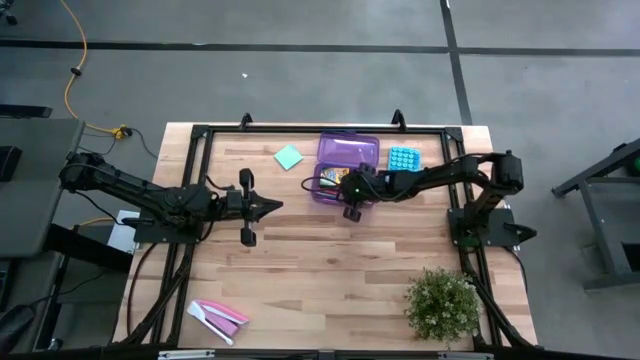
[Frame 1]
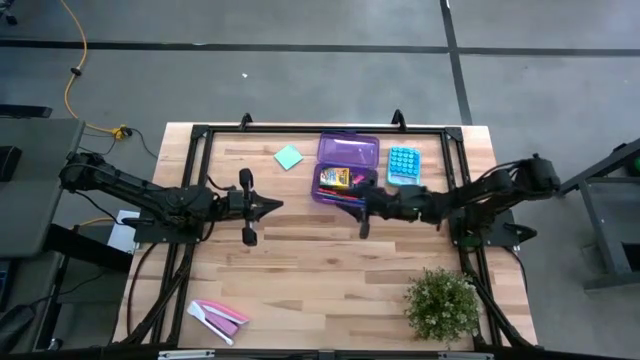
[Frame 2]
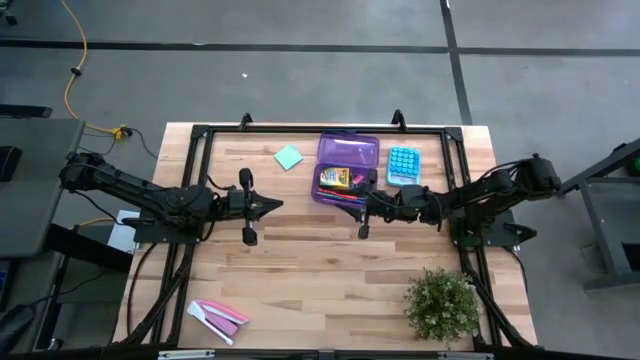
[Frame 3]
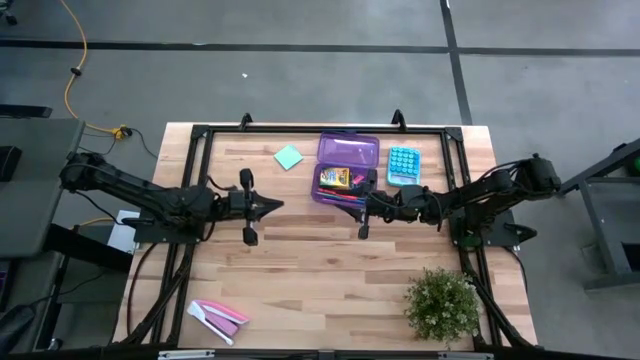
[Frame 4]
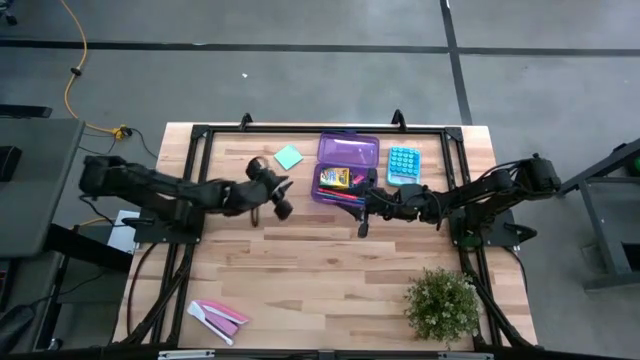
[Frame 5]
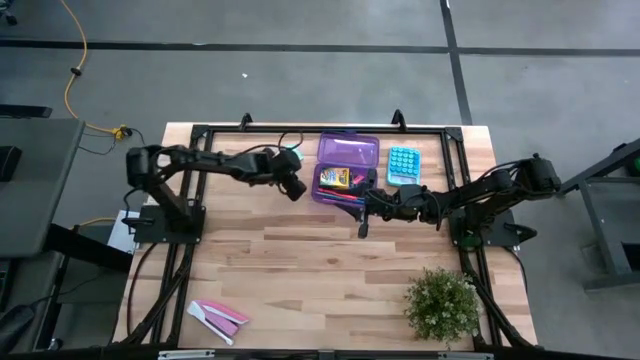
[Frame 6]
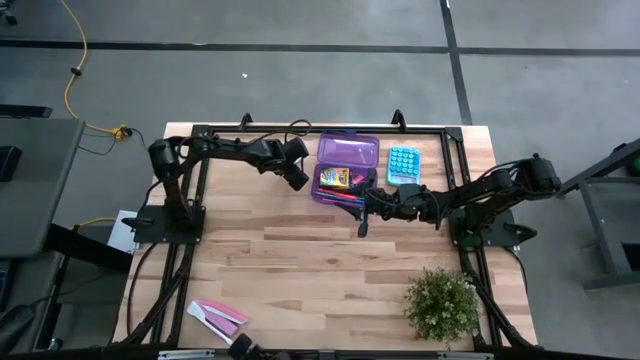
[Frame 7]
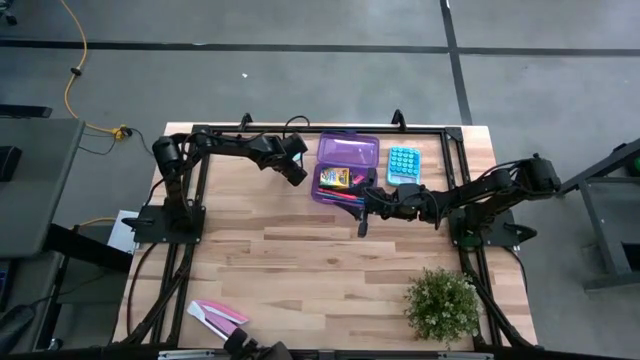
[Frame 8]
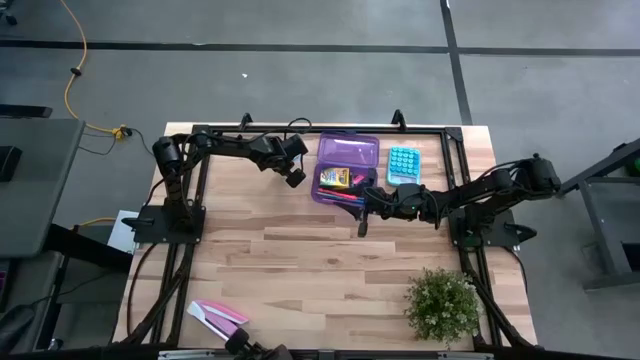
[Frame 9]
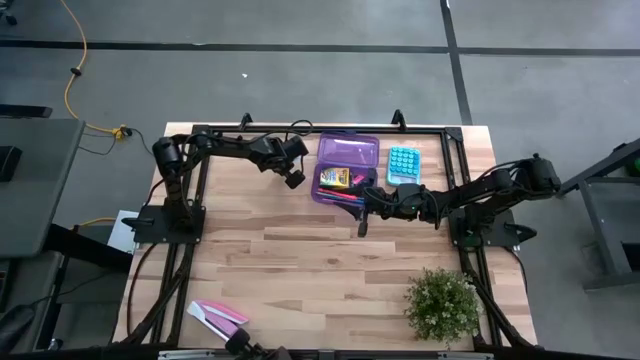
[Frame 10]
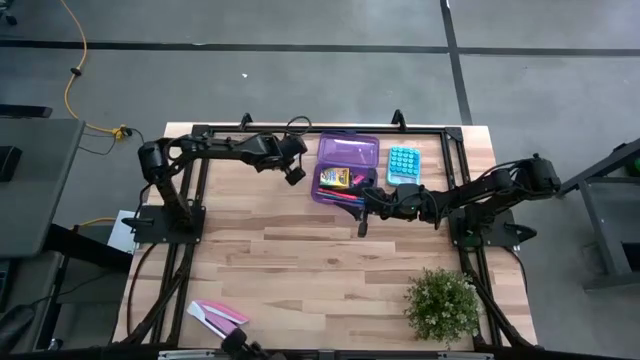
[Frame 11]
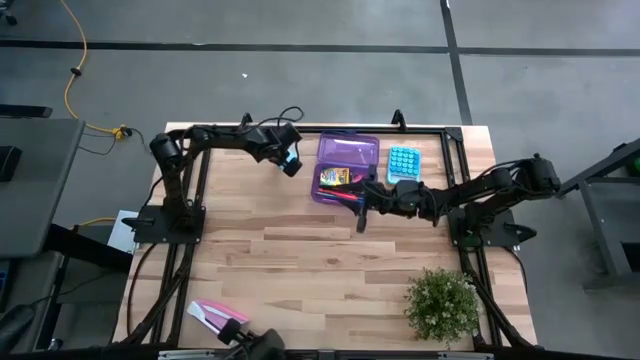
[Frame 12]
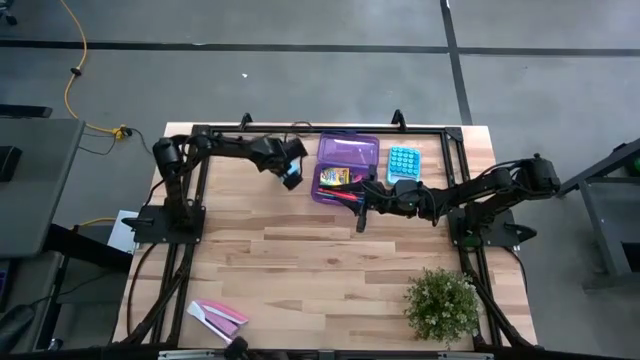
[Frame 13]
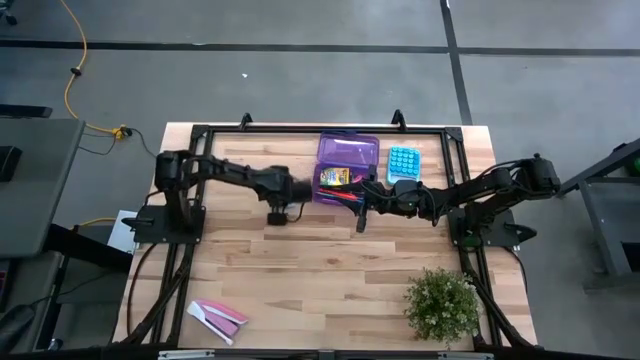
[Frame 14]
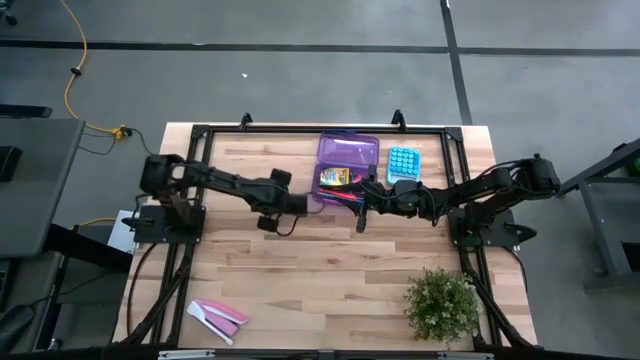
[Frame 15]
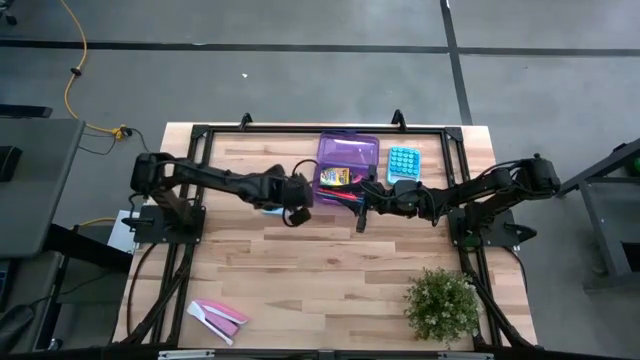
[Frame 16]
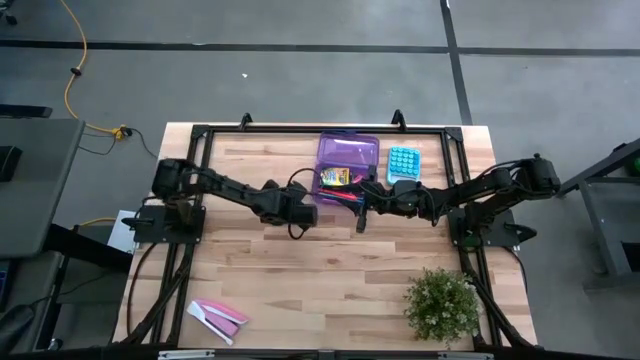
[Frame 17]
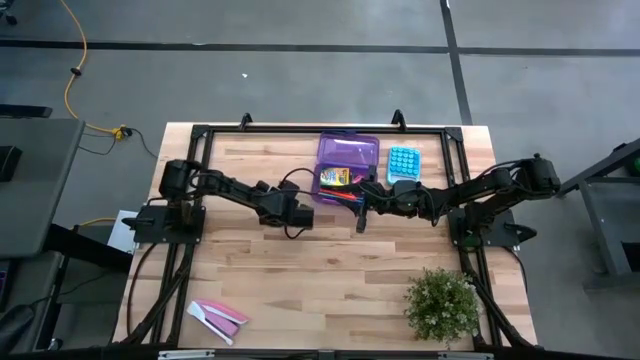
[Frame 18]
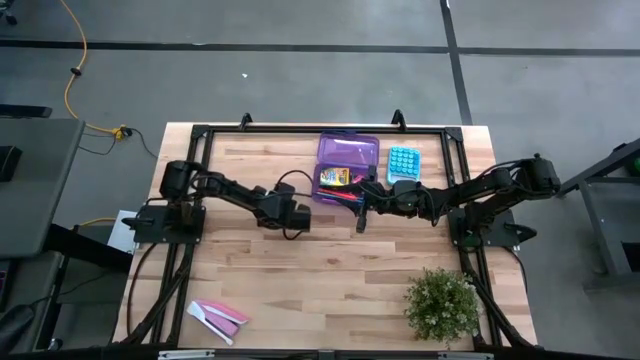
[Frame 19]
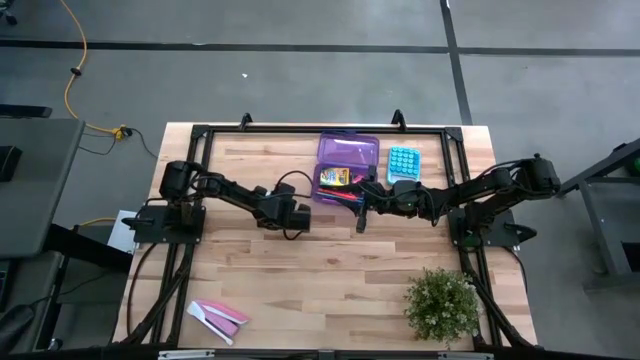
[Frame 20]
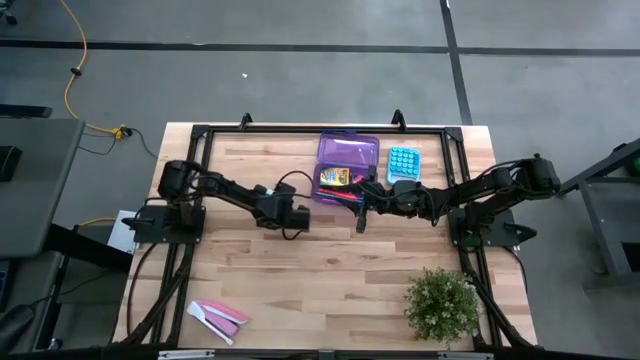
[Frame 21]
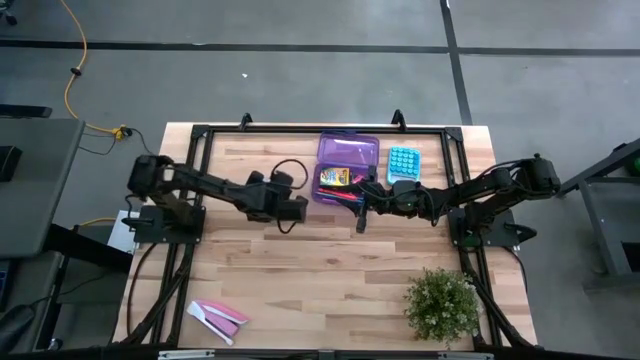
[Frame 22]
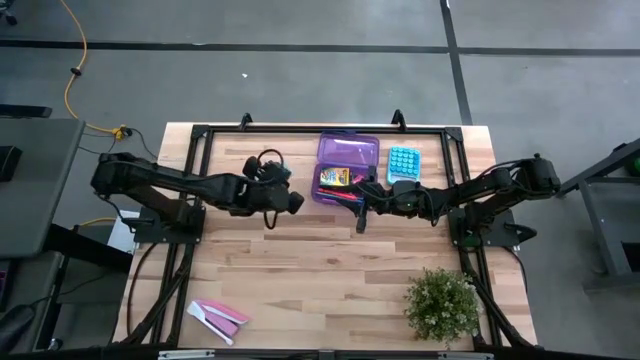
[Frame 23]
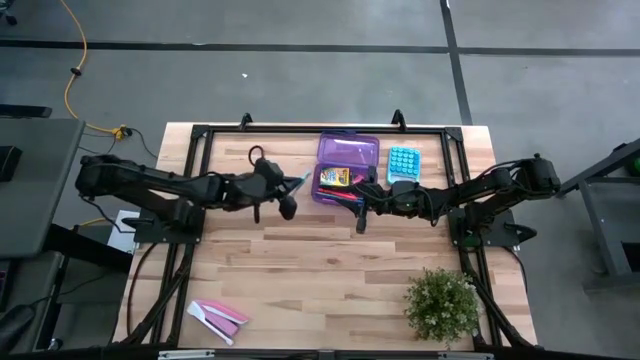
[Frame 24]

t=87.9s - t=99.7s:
Task: Pack school essentials
Put the light blue sticky note into the violet supply box

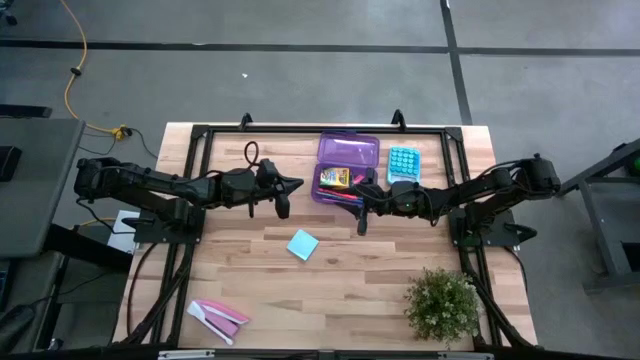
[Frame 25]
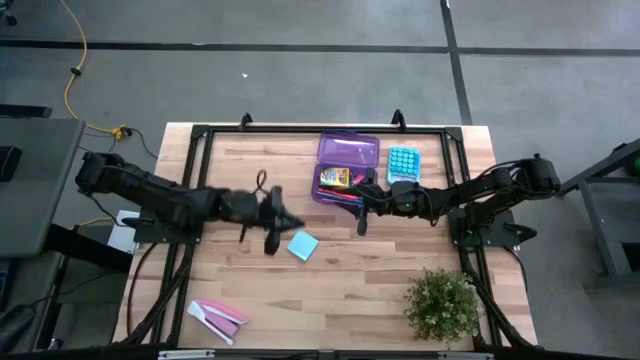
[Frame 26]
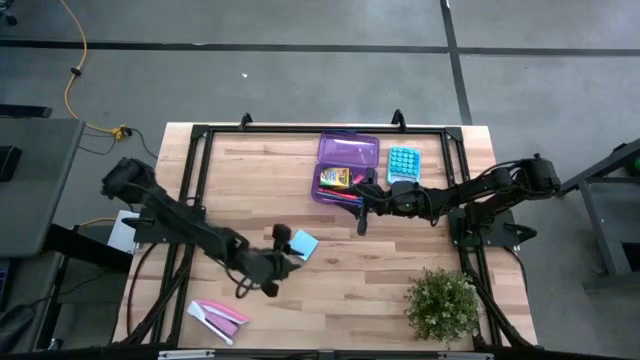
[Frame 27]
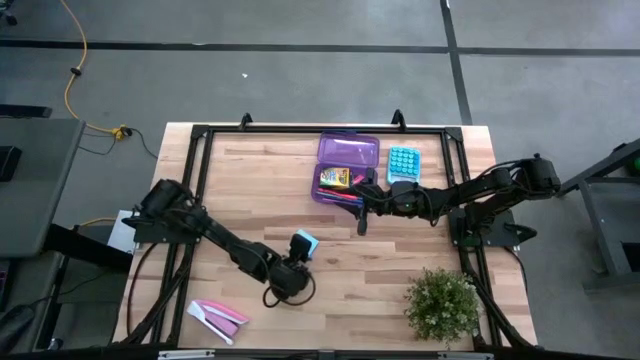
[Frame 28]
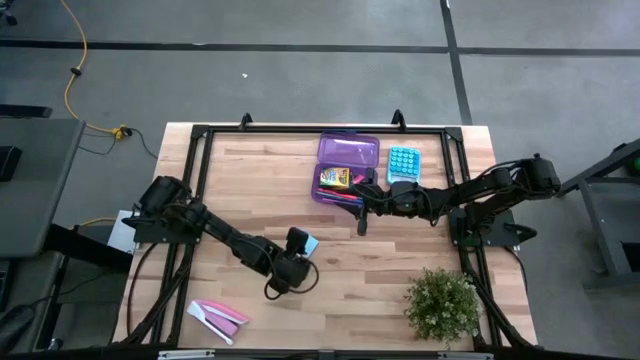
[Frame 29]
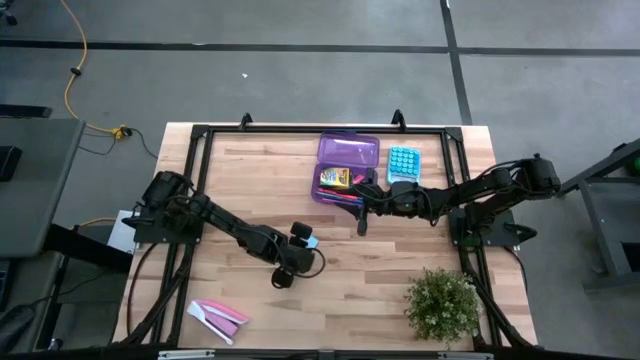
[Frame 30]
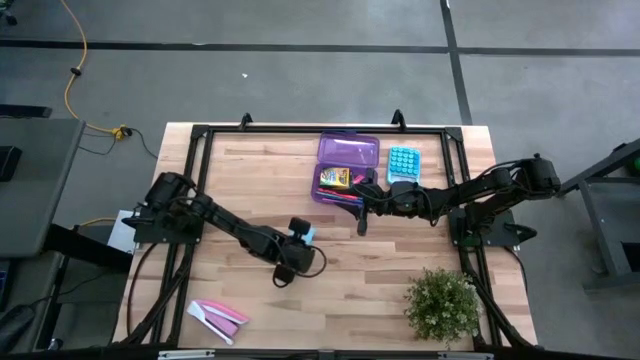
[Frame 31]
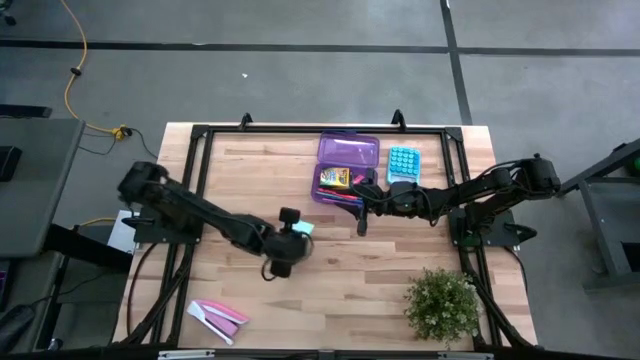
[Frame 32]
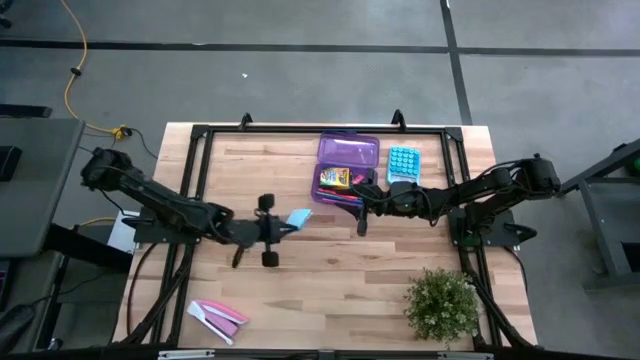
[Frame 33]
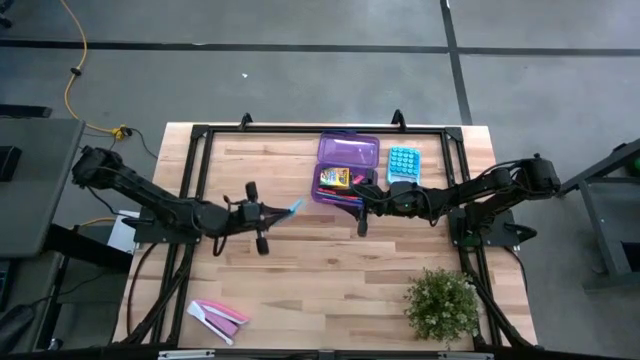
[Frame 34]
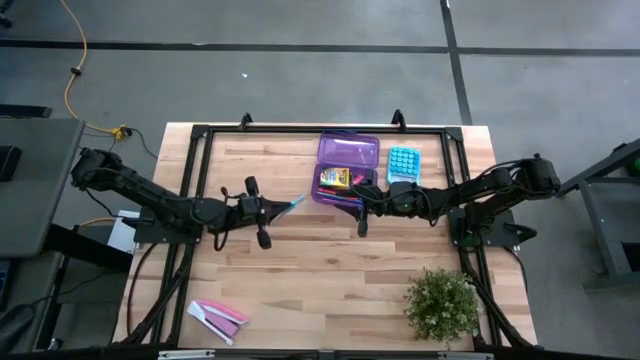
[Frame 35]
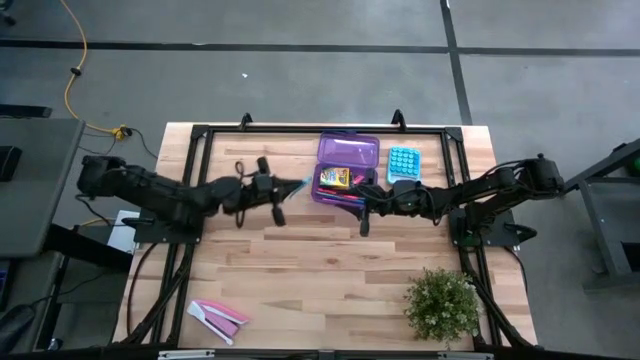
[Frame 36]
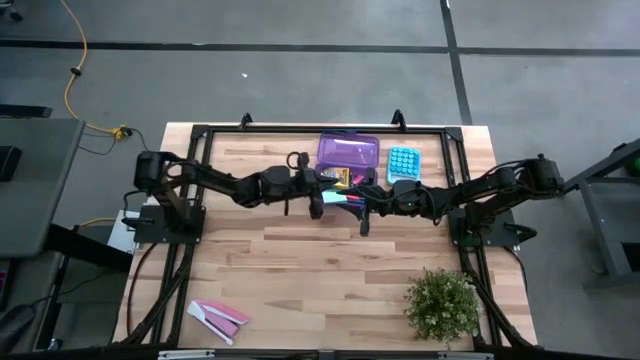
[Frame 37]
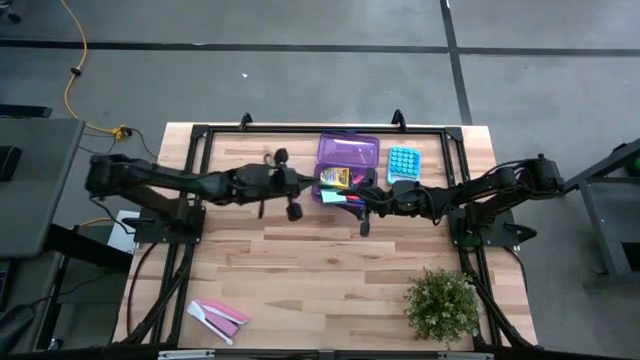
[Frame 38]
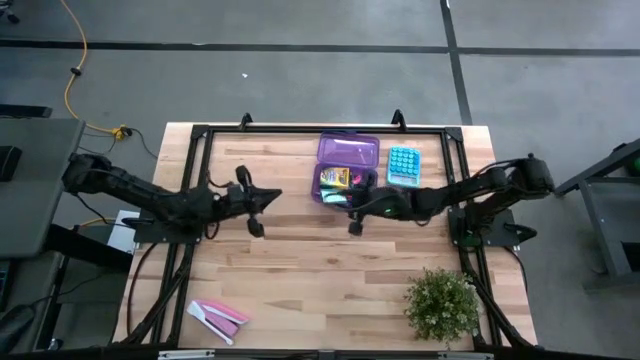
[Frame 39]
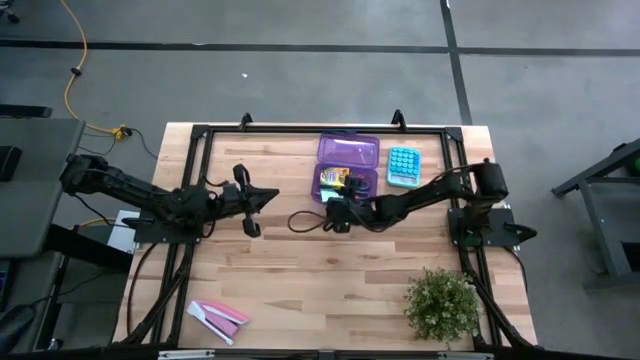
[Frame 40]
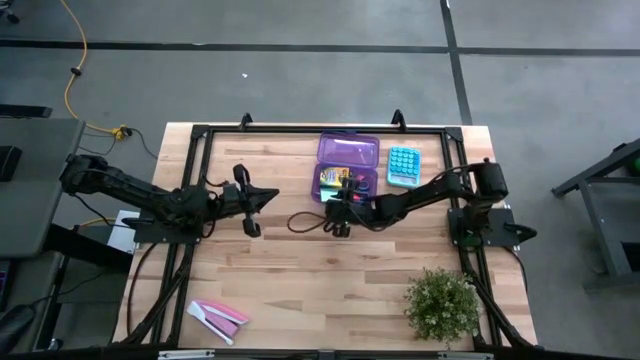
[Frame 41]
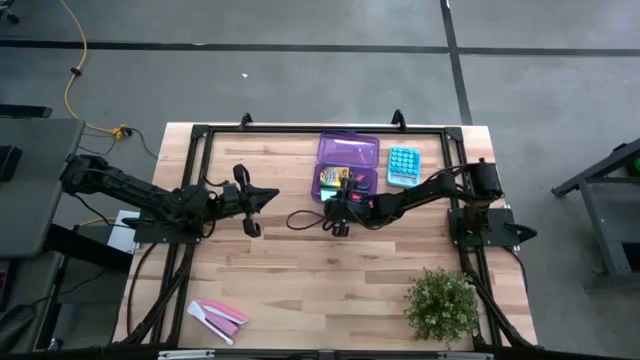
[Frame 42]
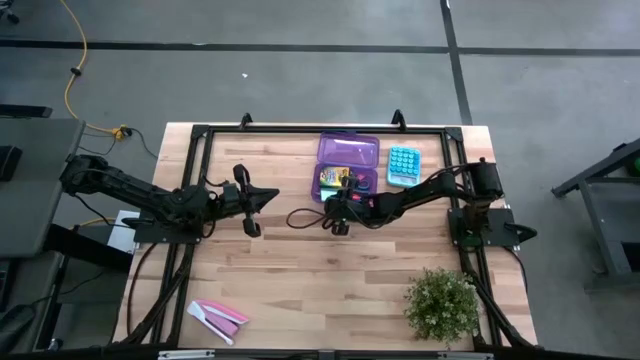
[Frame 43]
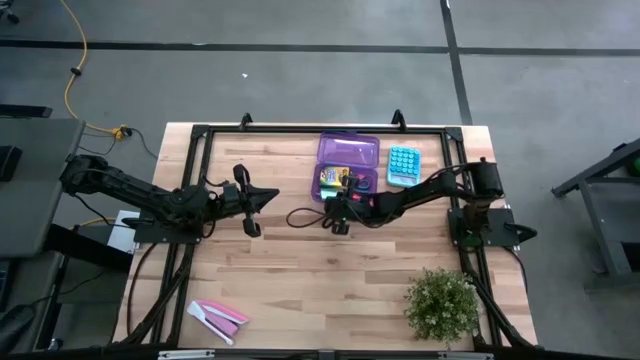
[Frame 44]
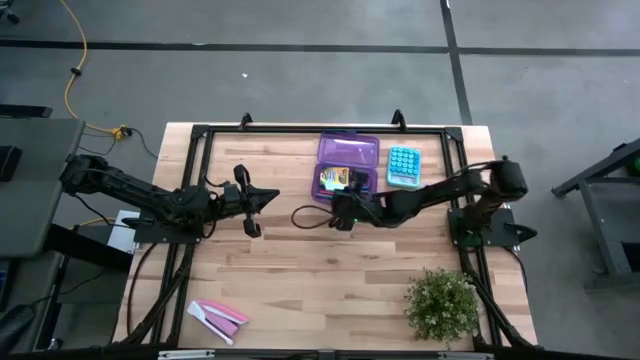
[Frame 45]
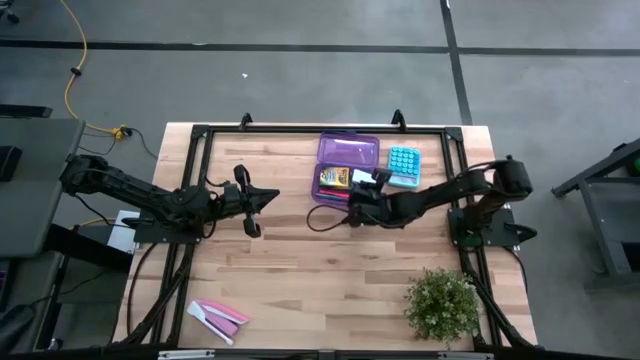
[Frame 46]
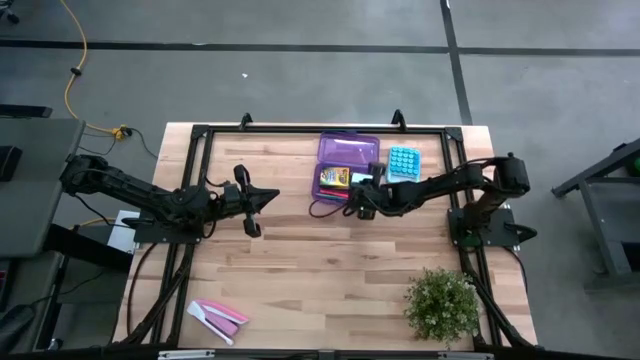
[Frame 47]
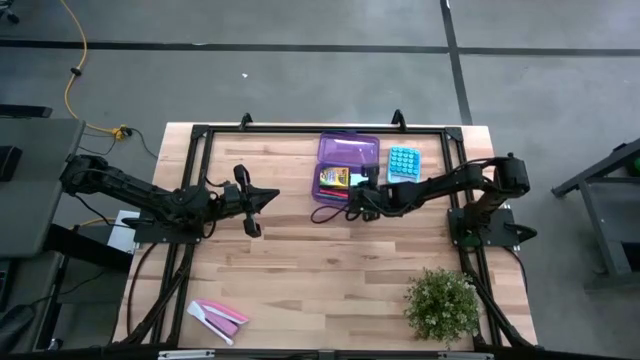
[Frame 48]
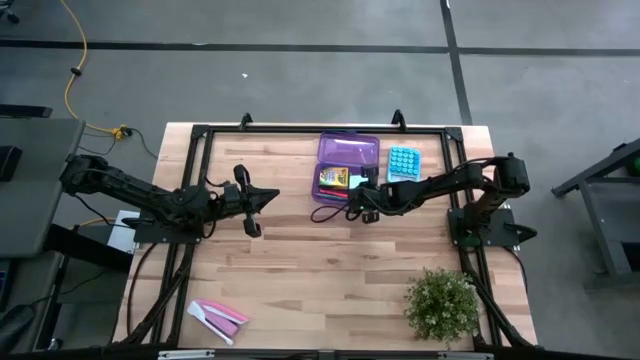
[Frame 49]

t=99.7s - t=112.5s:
Put the light blue sticky note into the violet supply box
